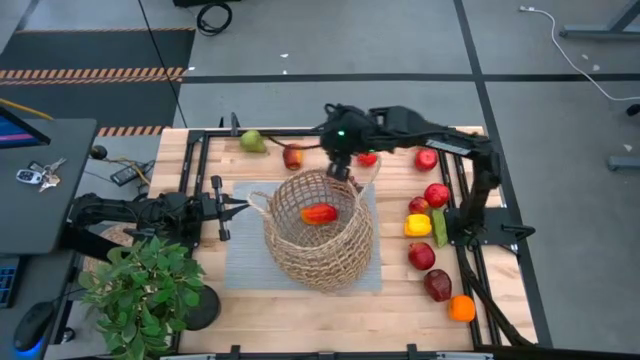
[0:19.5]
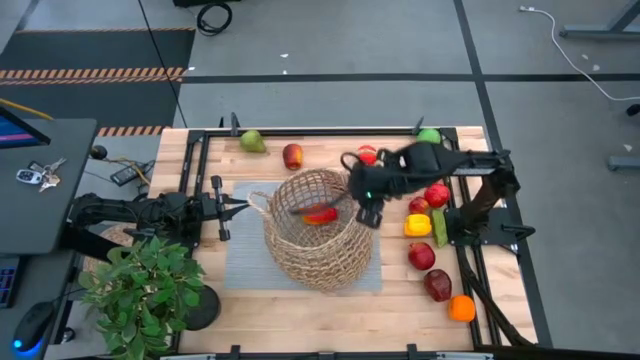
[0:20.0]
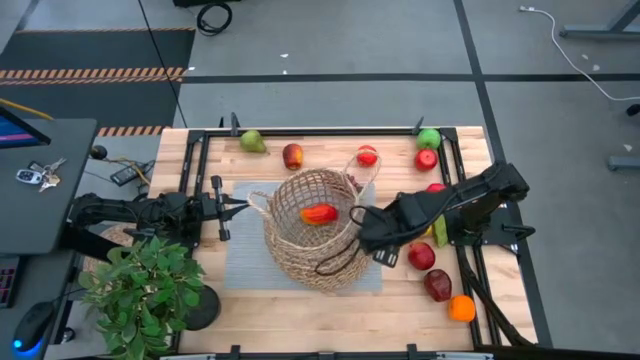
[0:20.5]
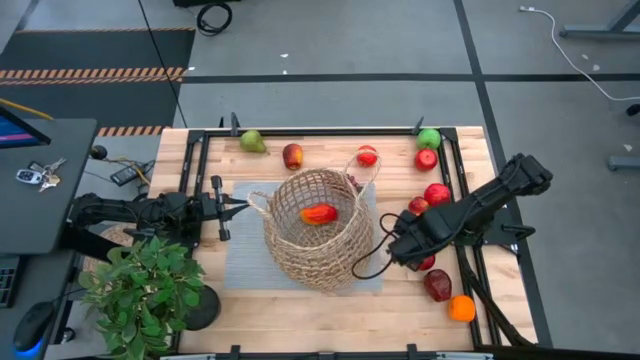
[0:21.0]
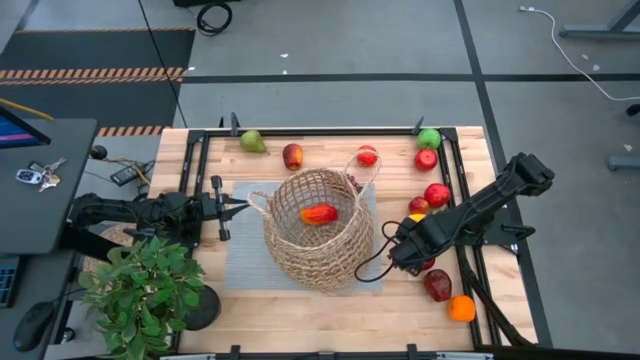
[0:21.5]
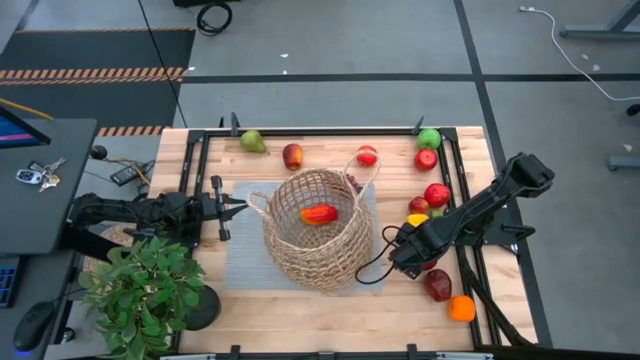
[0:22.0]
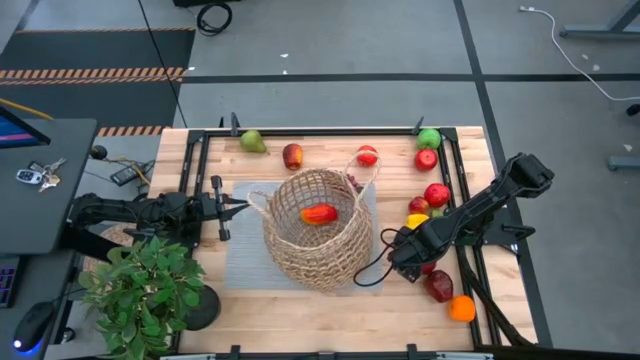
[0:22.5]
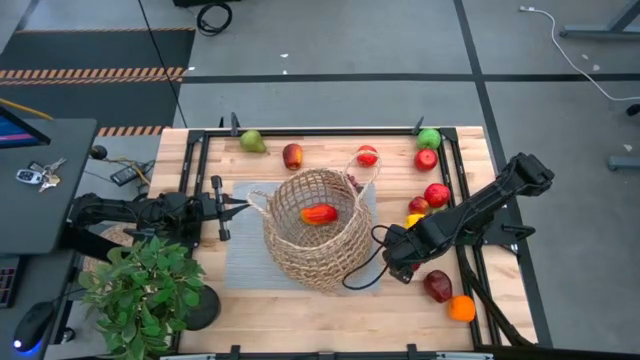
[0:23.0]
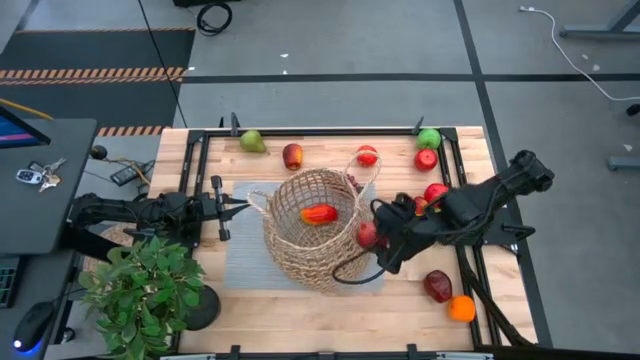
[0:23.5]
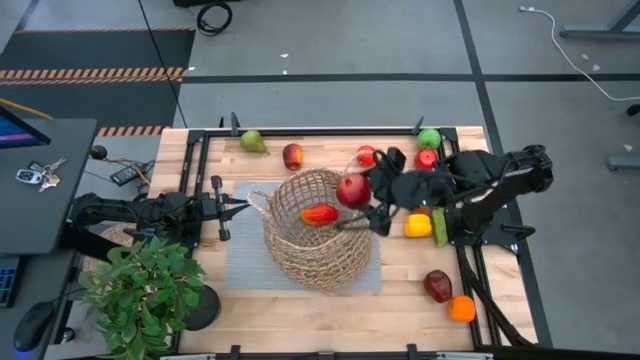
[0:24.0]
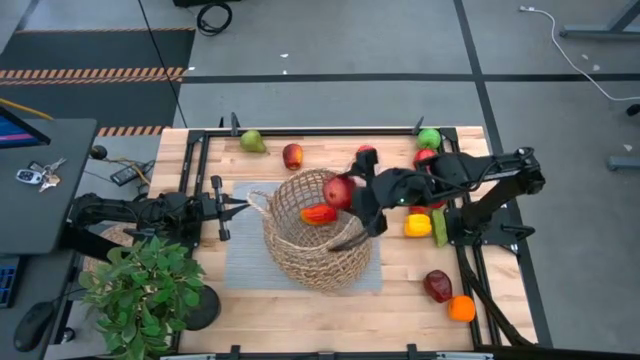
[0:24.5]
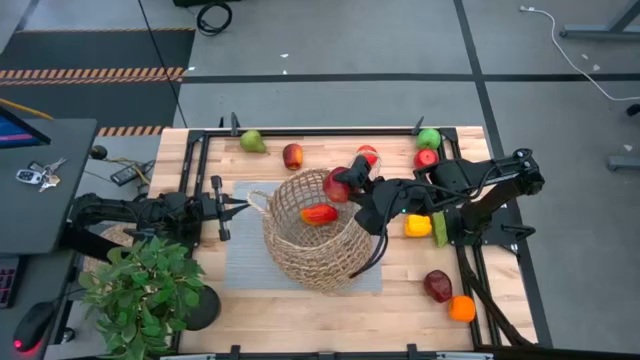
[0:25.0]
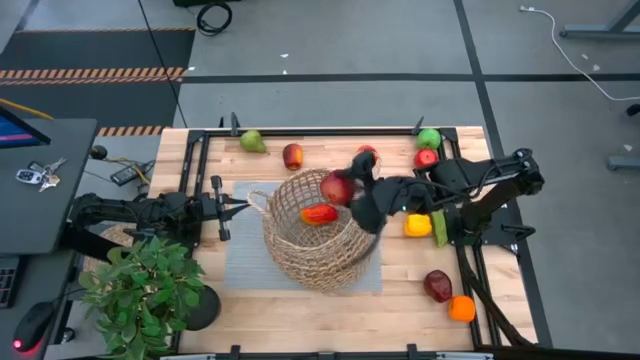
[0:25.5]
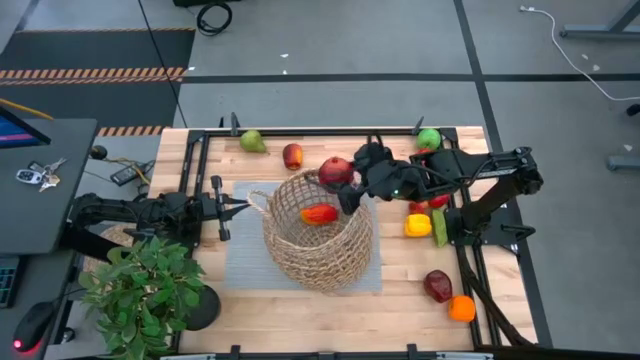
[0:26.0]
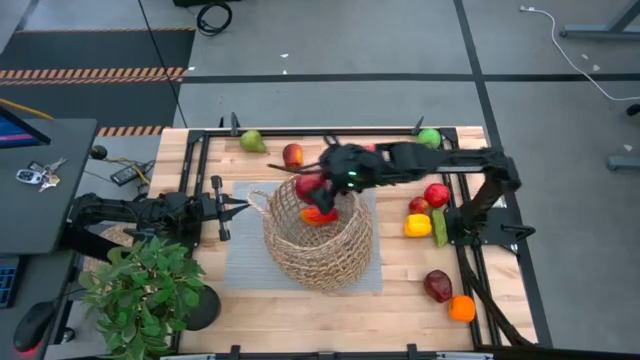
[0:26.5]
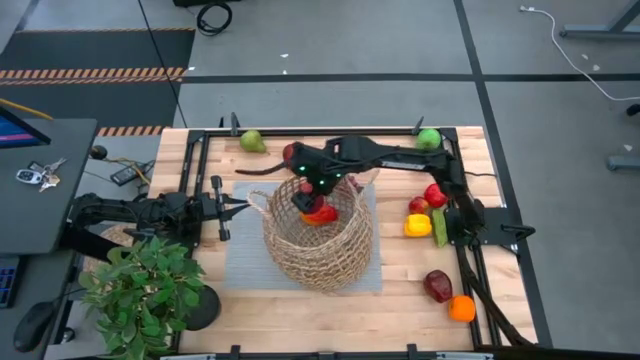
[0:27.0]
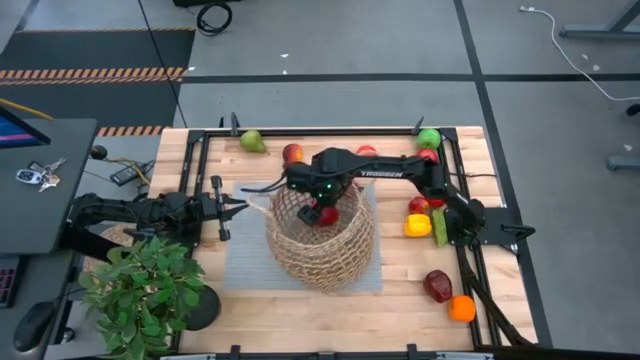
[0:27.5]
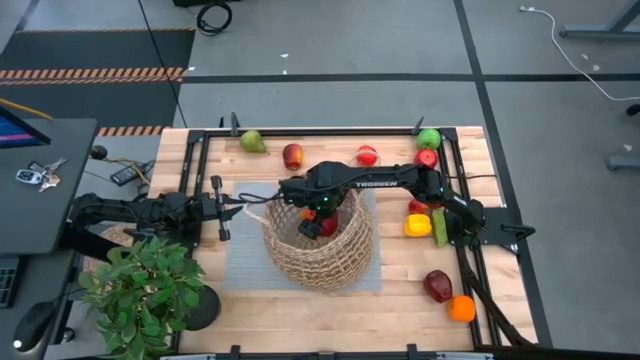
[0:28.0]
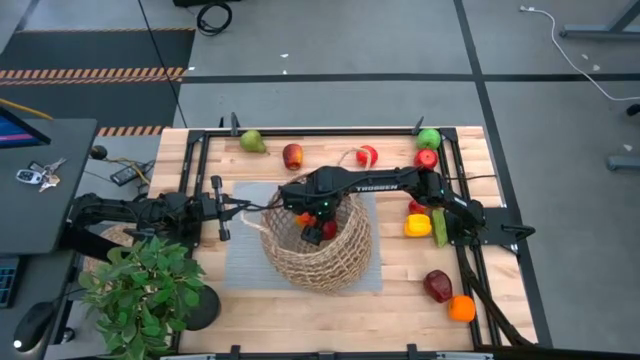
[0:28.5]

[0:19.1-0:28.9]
Task: Build produce basket
Put the pomegranate into the brown basket

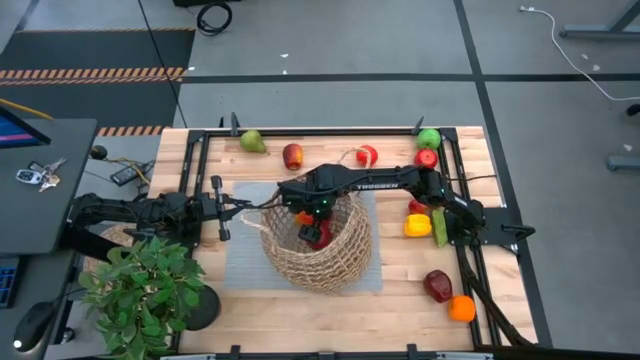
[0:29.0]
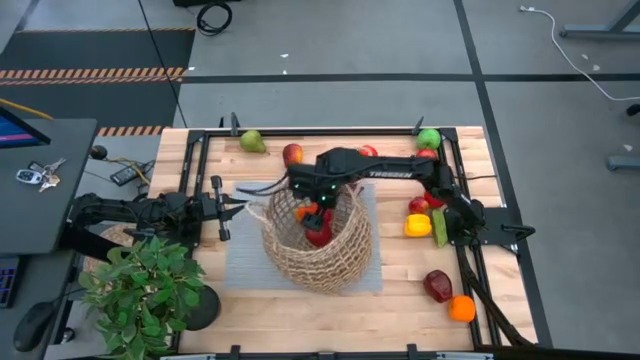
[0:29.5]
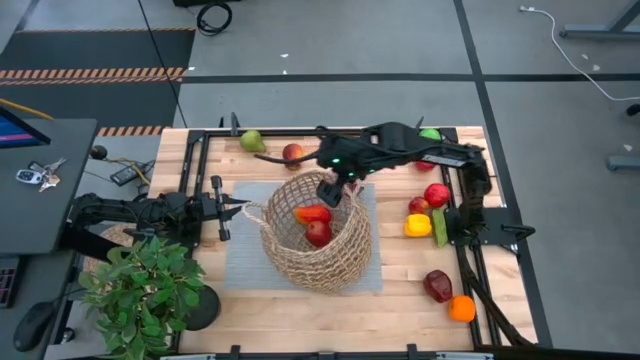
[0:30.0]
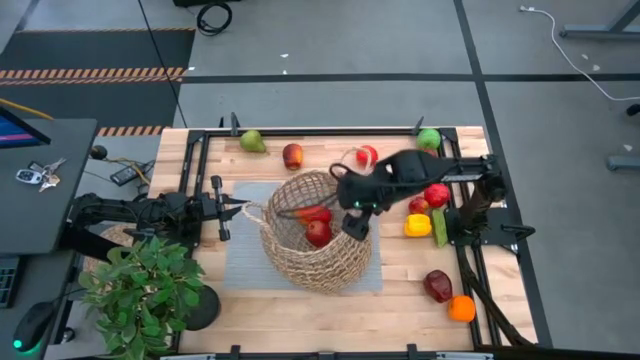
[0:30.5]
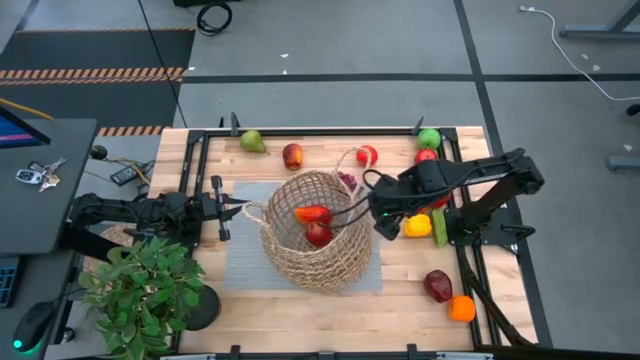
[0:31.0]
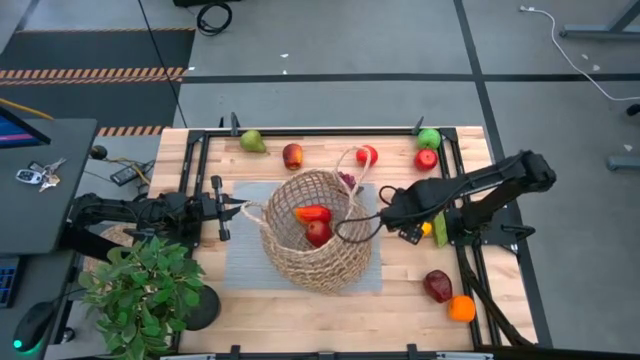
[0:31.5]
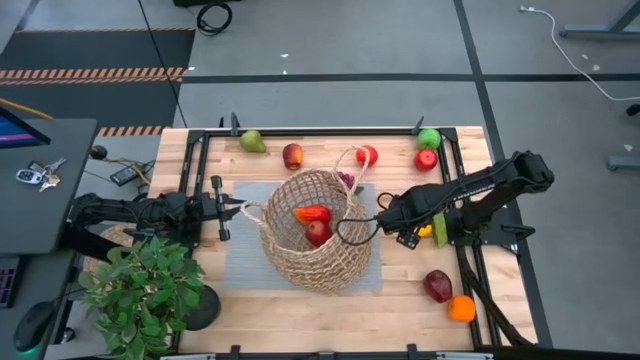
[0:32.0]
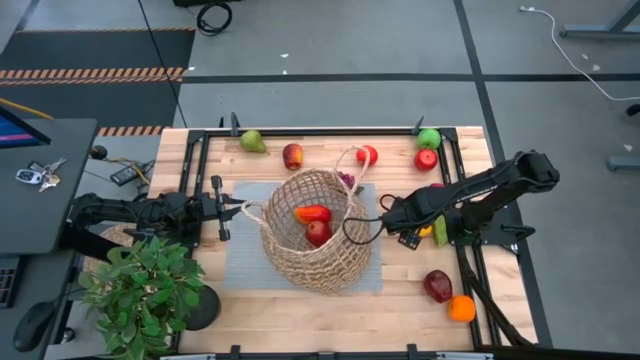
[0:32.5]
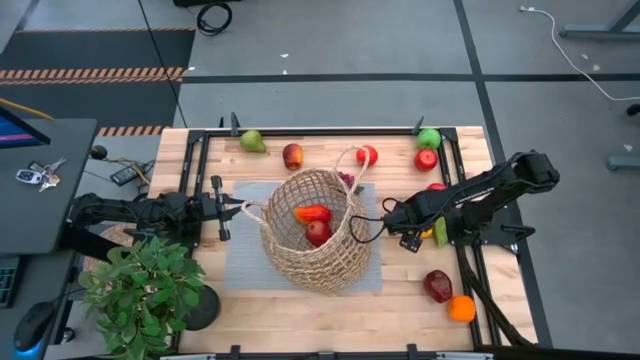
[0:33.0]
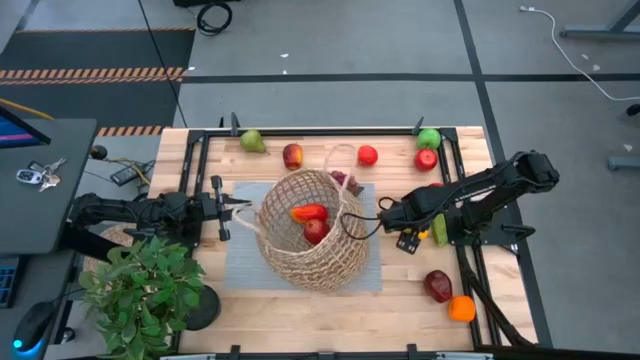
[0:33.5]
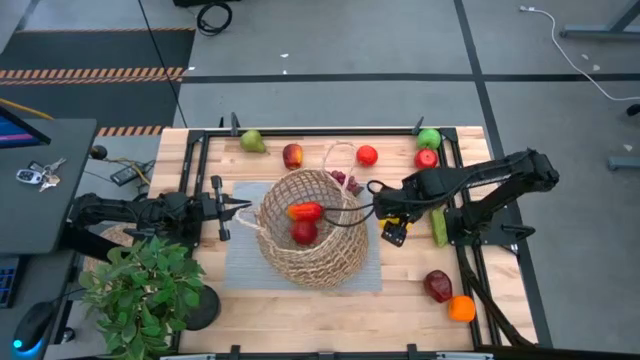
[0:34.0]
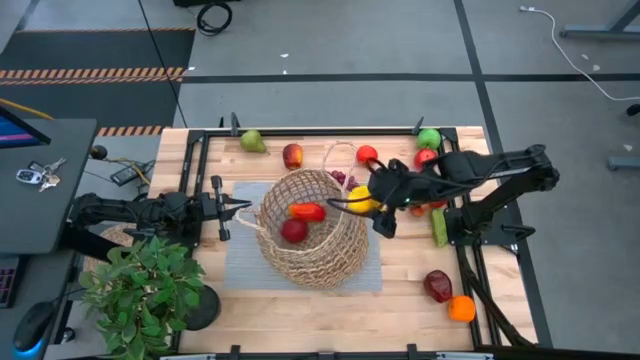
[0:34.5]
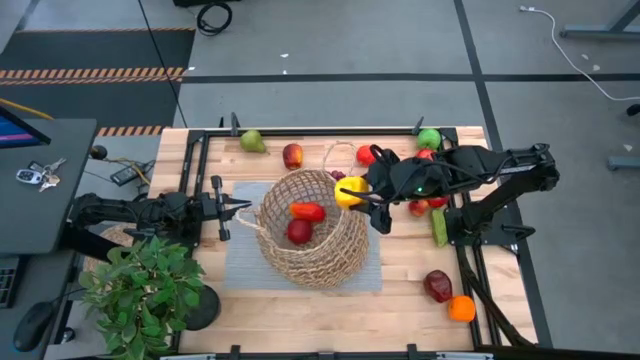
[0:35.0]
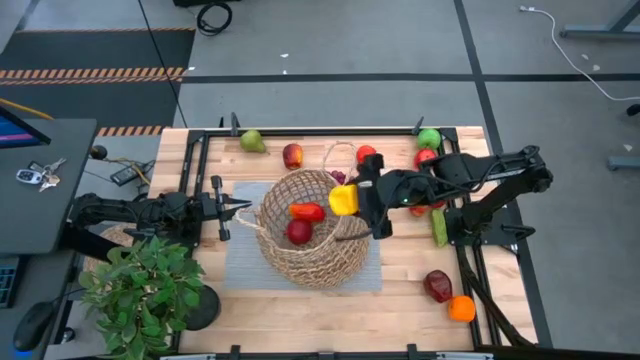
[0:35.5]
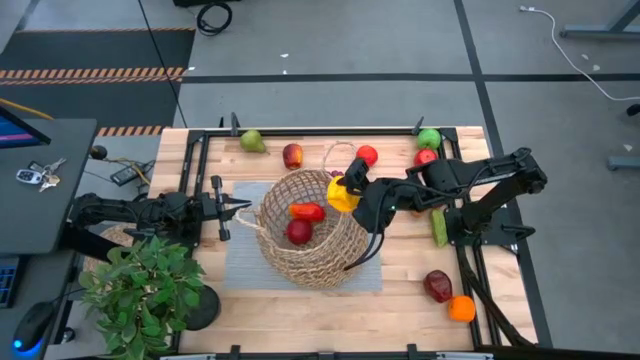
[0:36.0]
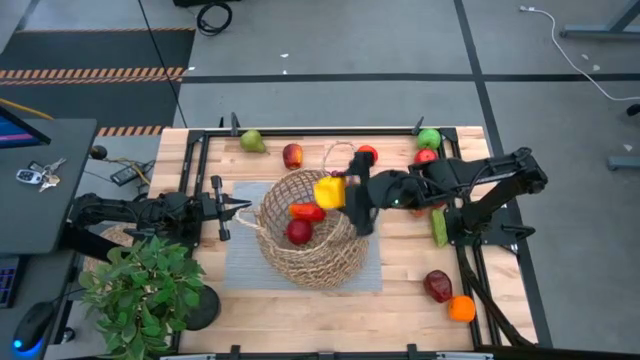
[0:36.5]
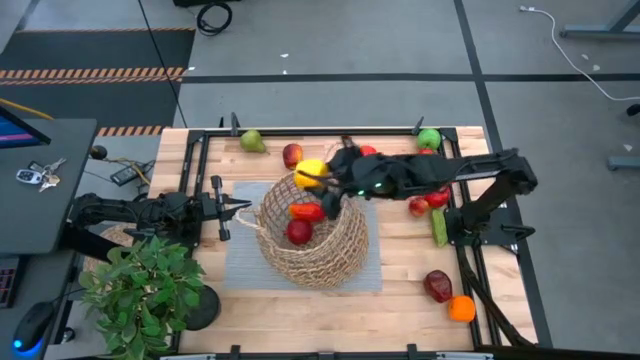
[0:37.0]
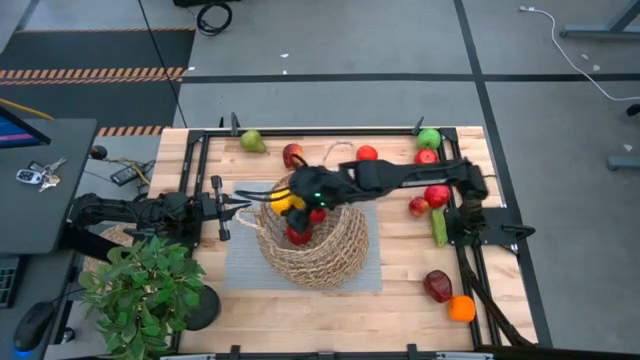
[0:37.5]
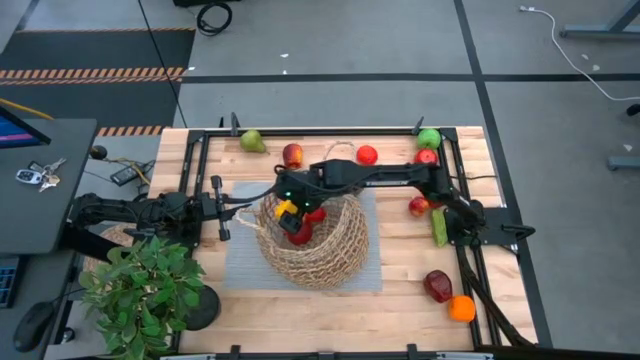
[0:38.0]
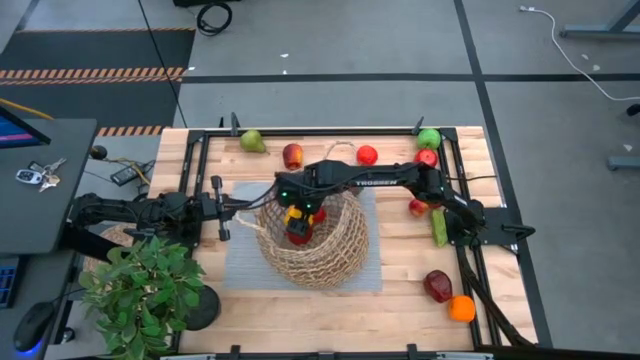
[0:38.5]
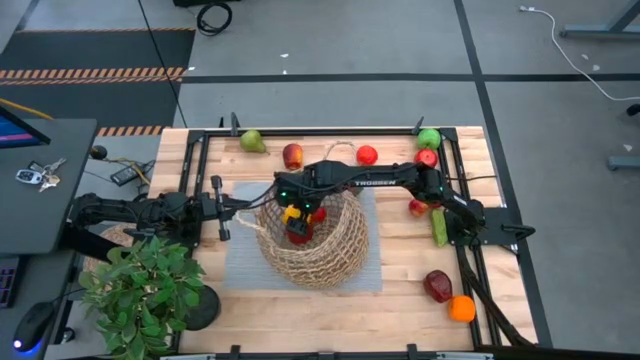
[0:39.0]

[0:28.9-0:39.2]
Put the yellow bell pepper into the brown basket

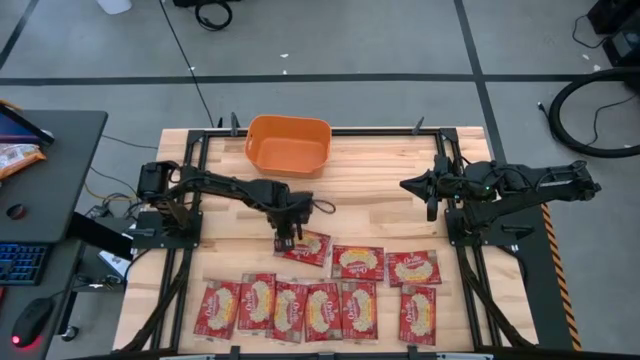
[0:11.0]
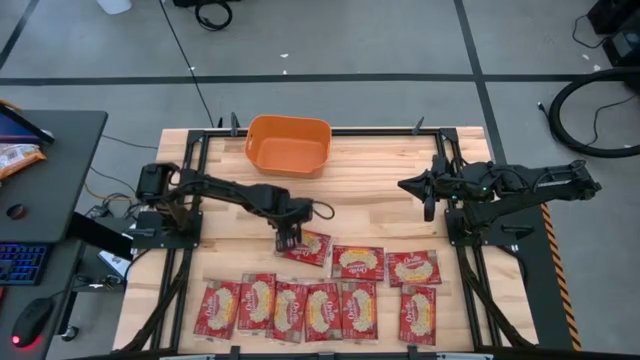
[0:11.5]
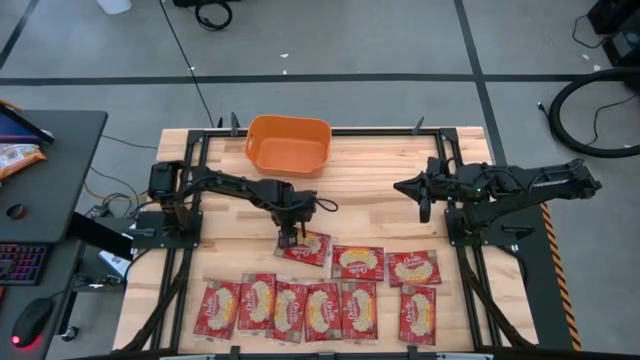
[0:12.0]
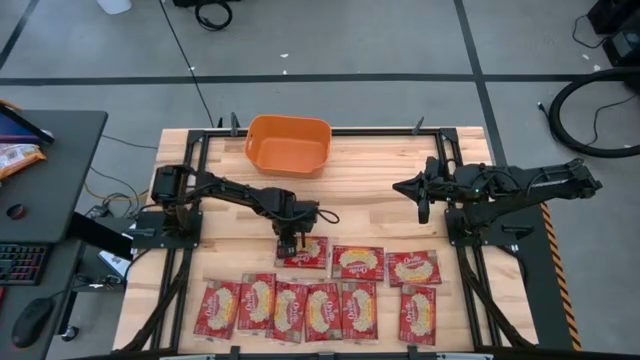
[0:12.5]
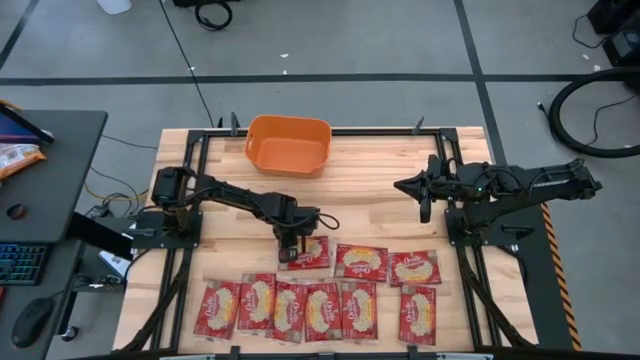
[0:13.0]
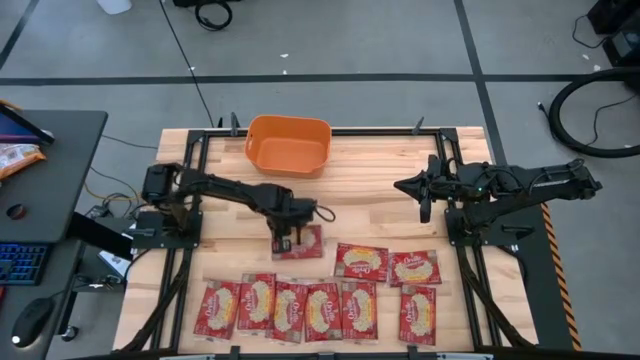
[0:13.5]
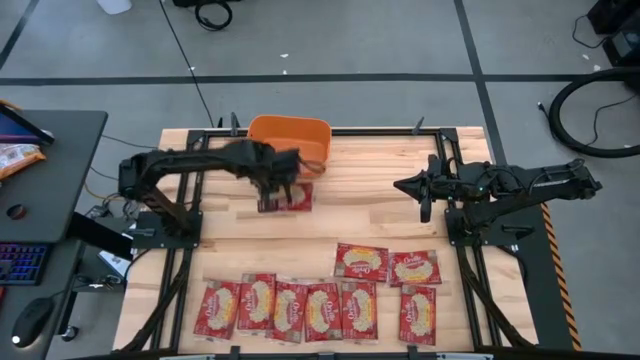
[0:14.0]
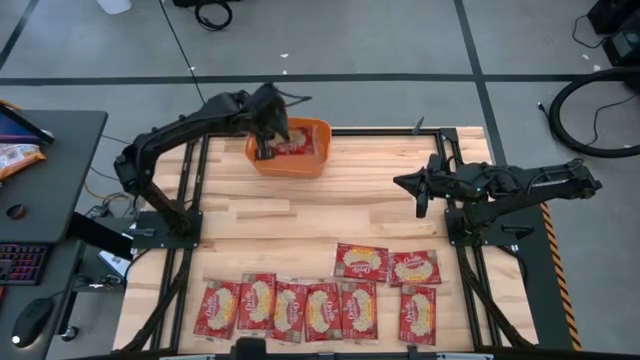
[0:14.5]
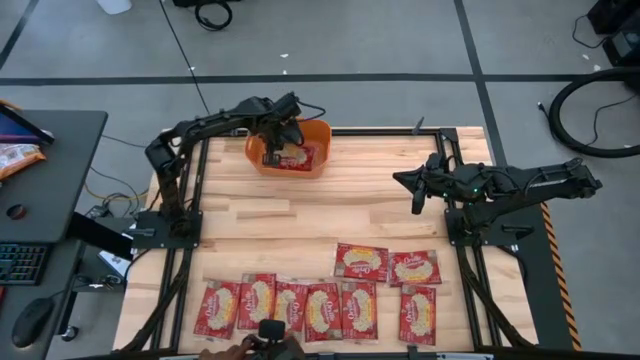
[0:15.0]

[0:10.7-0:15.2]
Task: Sort popcorn bags into baskets
Put the red popcorn bag into the orange container
